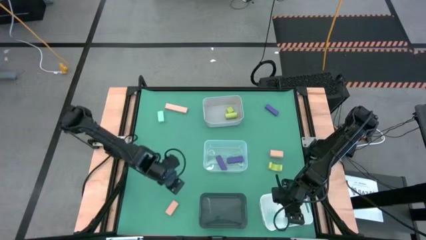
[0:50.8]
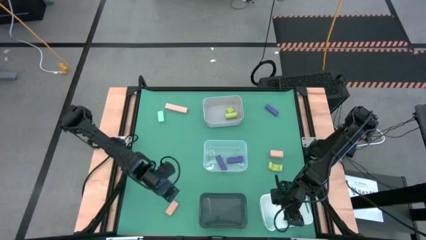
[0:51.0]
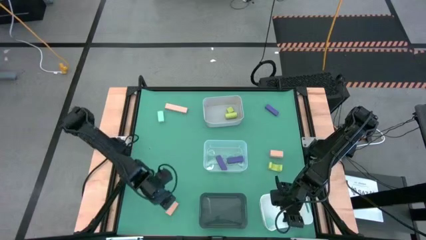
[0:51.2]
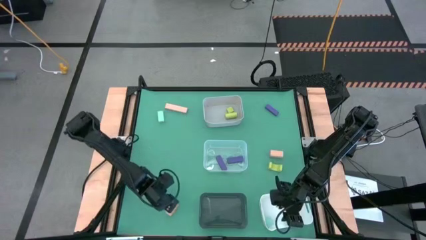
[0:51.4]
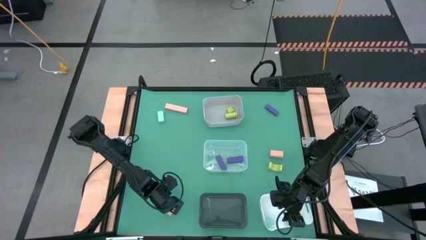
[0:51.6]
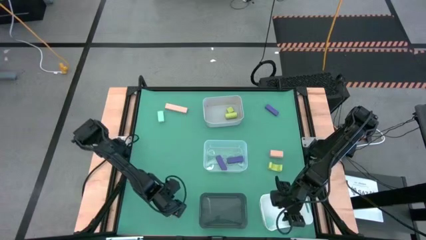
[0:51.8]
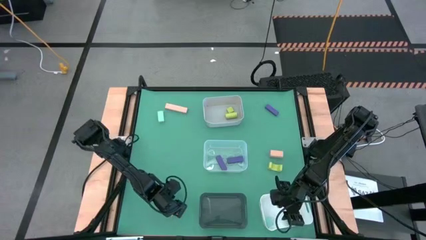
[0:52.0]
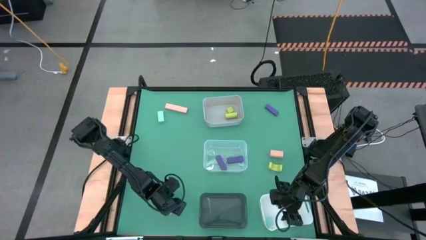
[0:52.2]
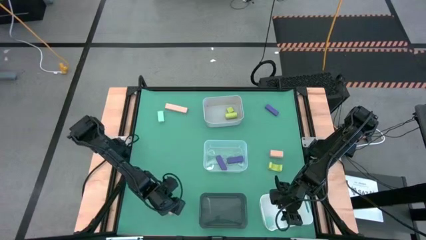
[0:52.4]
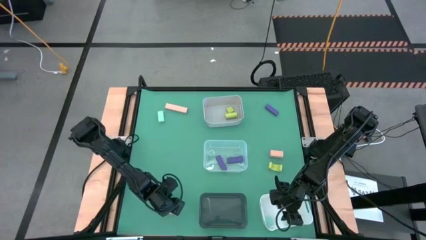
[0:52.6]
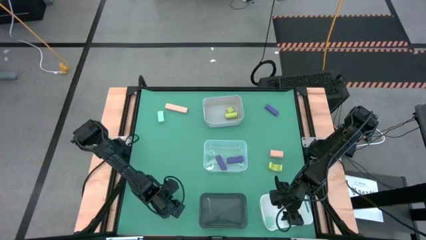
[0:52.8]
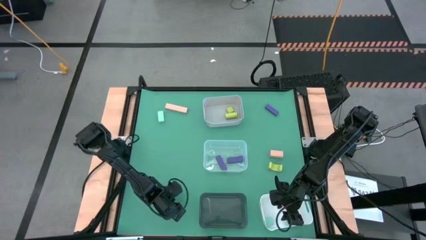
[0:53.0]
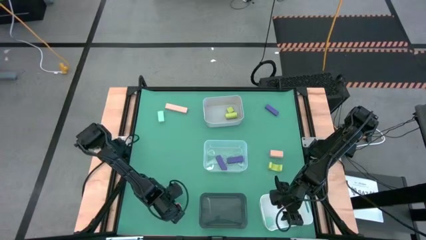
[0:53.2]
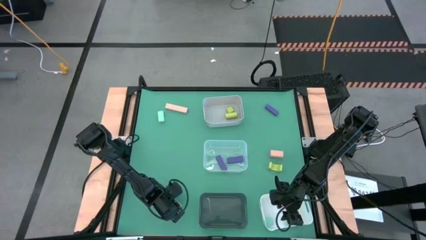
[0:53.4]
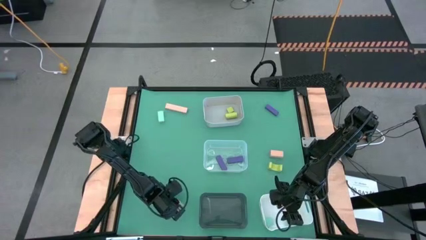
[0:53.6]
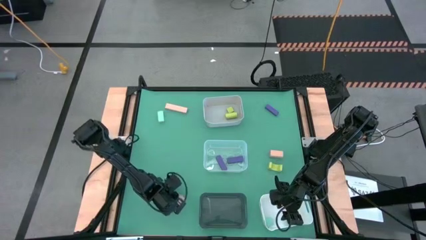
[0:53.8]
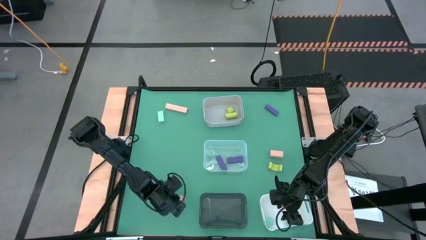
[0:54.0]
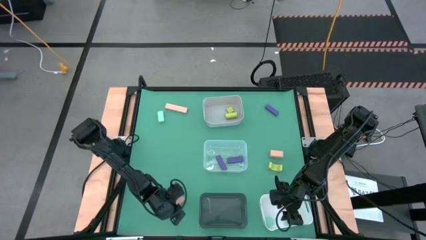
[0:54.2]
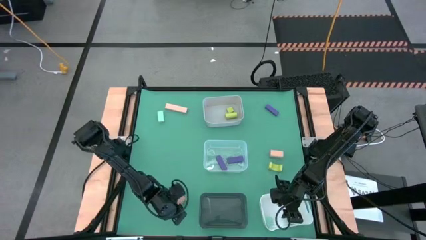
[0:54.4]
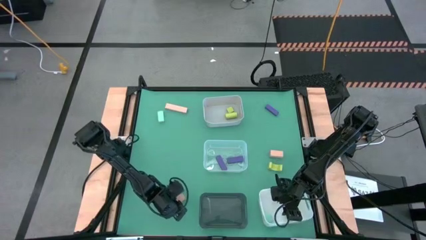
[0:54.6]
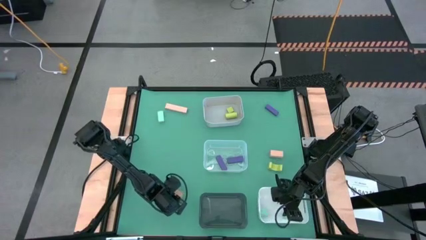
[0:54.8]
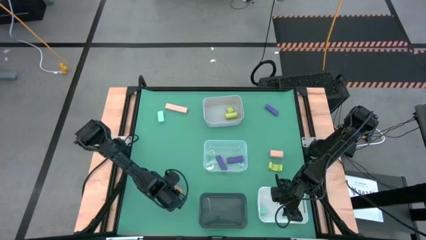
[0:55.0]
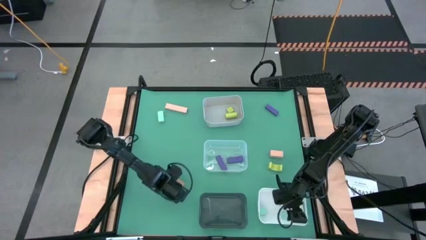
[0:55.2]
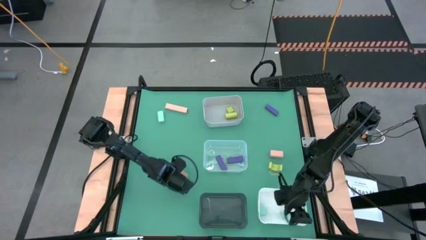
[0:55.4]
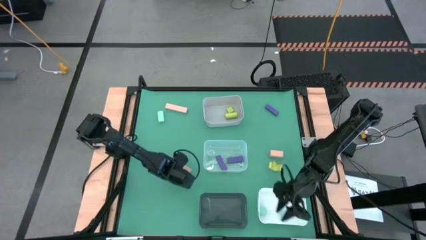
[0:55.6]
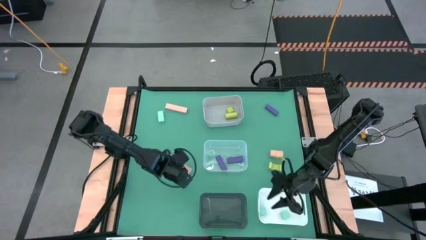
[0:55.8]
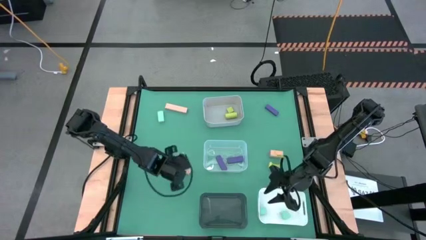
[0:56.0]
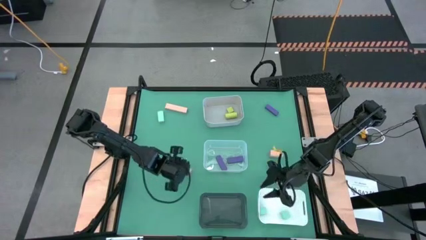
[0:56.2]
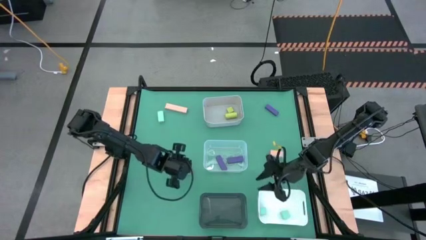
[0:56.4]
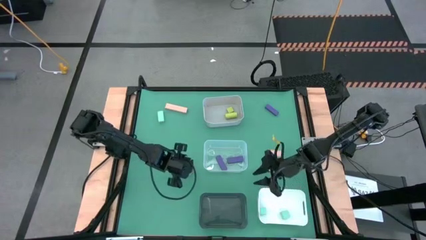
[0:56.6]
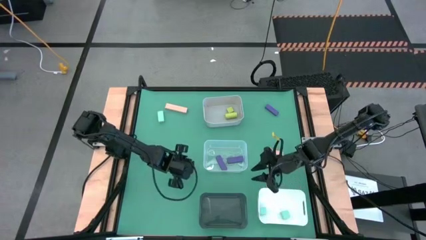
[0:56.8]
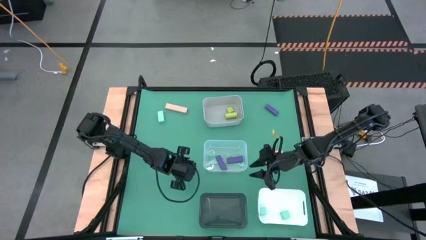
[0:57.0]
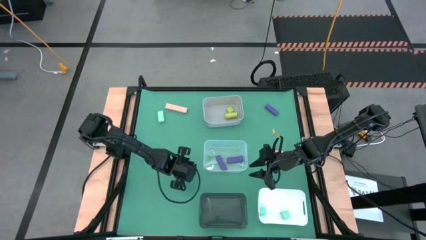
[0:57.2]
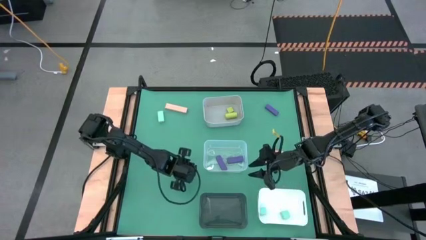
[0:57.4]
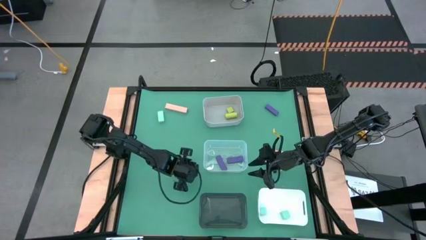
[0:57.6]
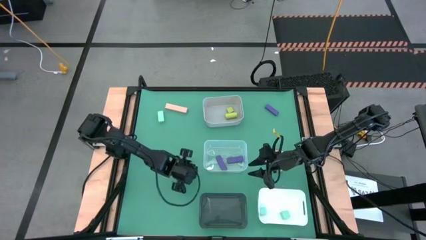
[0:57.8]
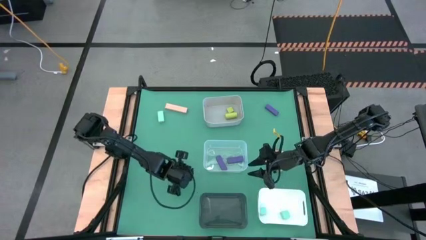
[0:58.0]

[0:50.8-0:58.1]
Task: Sort & place blocks by color
Put the bottom pink block into the black bin

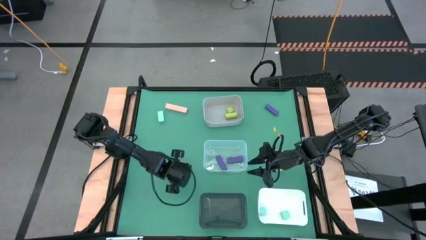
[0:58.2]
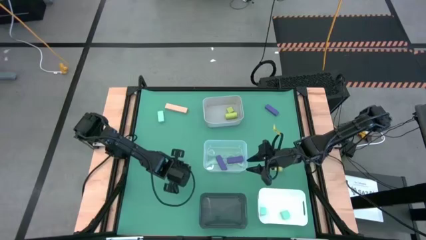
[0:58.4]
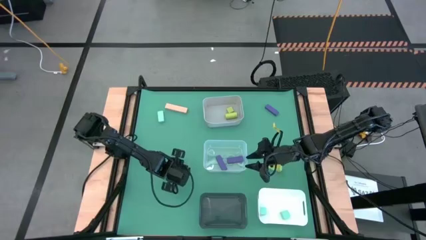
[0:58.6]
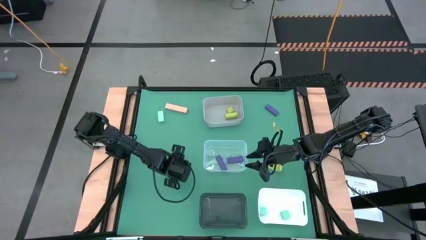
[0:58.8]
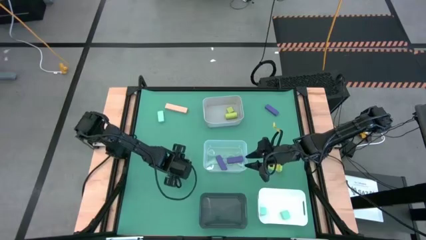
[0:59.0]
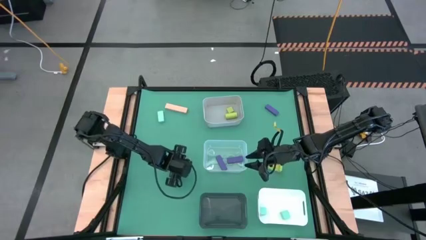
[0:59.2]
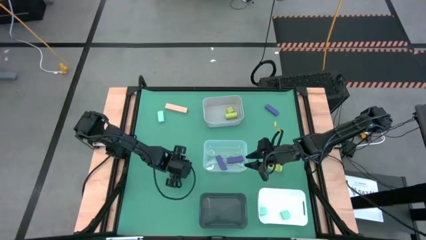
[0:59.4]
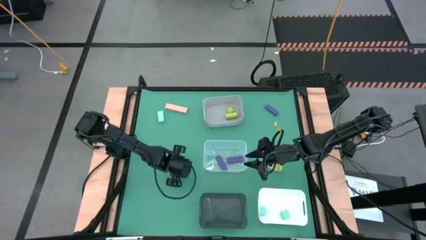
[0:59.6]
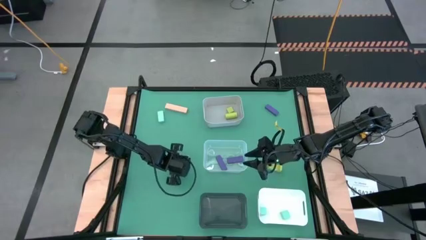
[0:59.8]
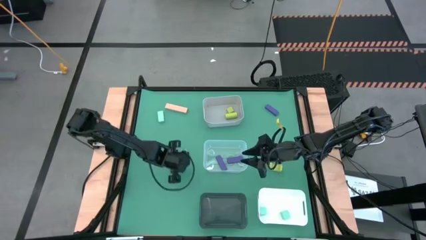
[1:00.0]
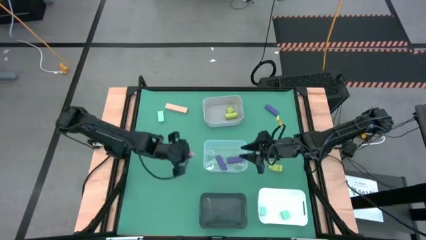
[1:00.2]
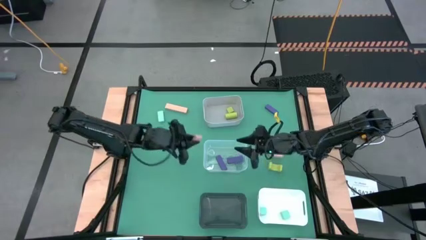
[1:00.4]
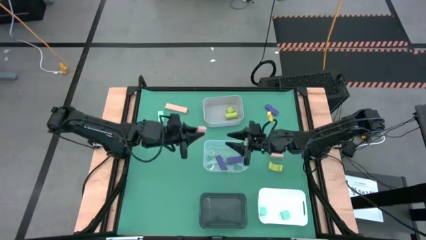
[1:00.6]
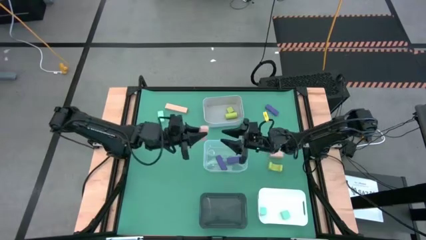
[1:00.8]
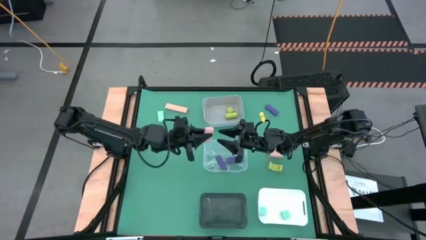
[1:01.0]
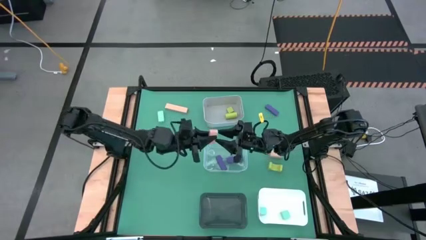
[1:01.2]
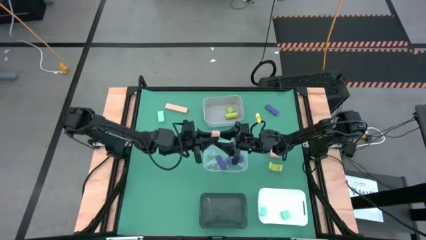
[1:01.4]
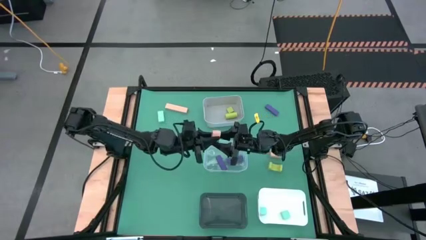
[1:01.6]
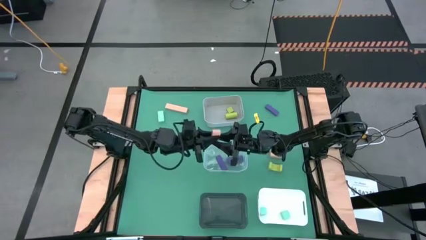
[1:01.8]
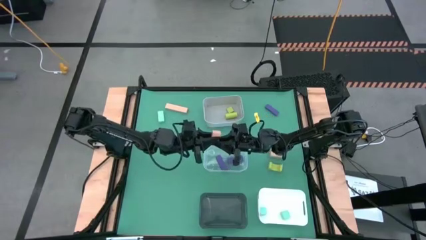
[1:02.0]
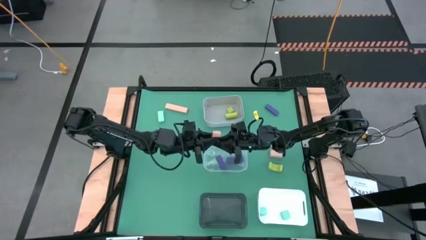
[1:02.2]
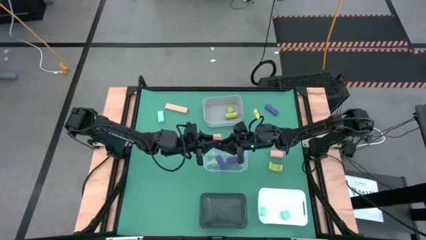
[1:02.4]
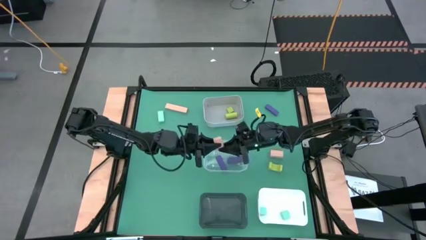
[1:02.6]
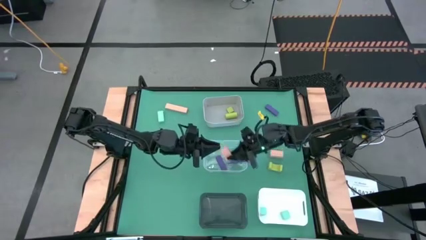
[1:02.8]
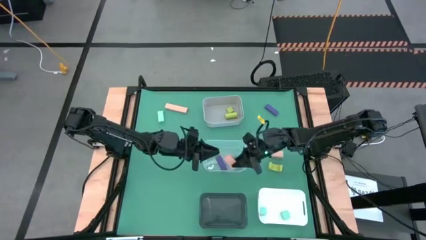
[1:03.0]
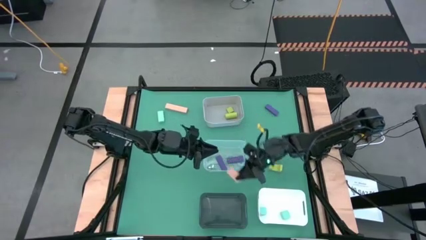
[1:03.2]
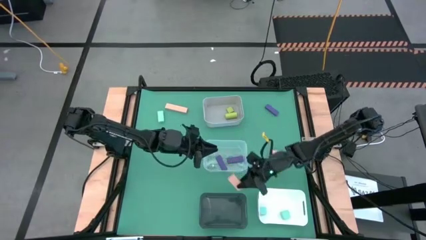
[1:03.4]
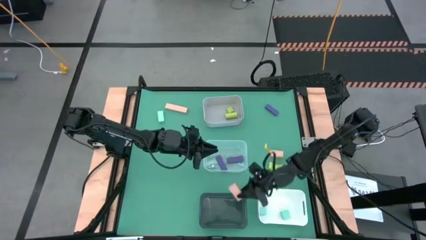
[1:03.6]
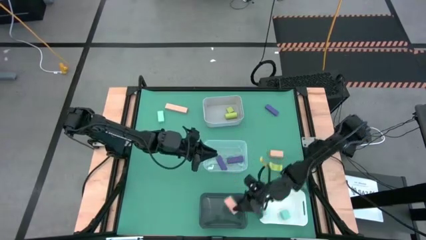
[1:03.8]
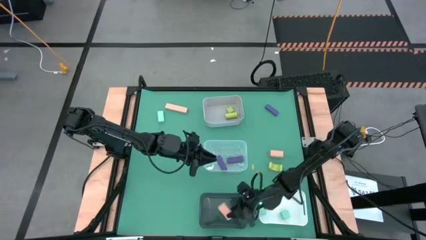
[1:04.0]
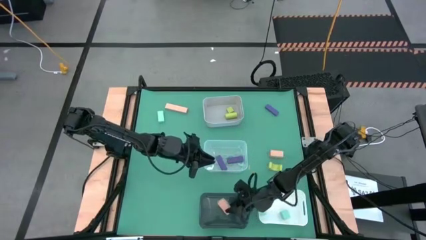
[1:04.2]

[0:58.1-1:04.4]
Put the bottom pink block into the black bin

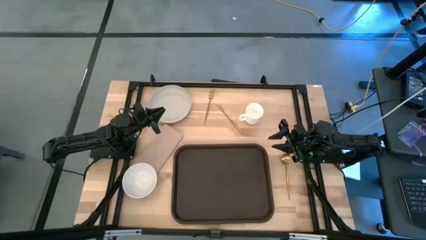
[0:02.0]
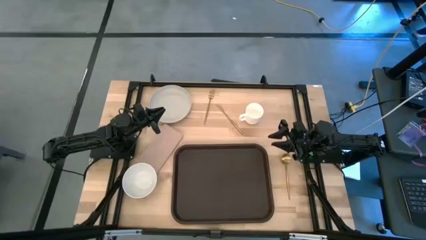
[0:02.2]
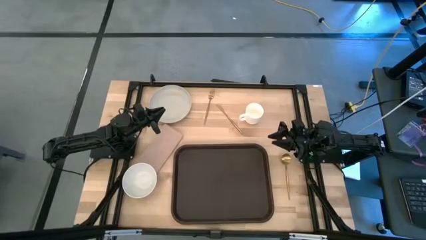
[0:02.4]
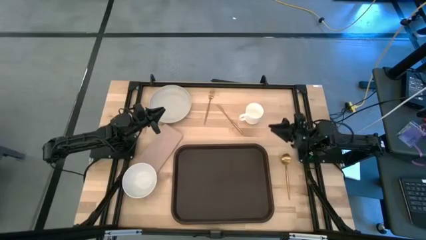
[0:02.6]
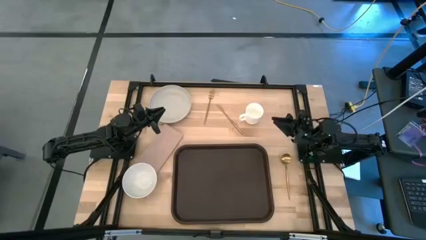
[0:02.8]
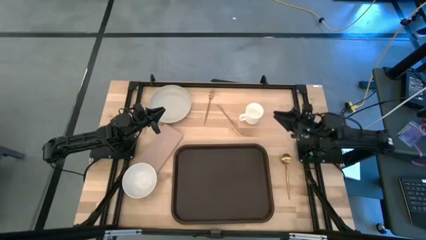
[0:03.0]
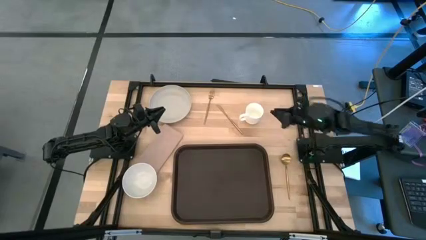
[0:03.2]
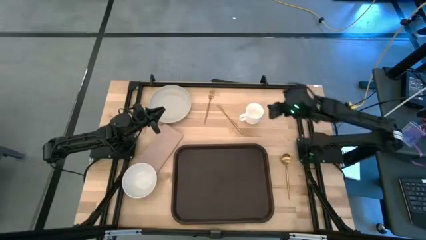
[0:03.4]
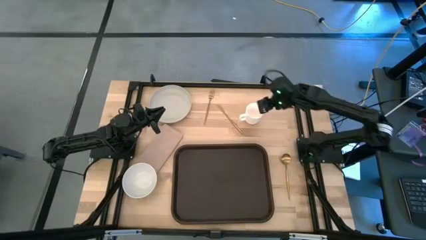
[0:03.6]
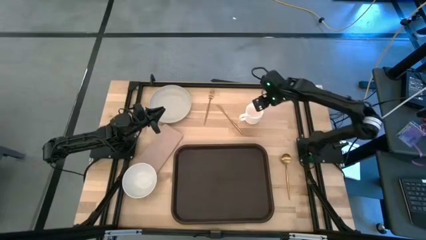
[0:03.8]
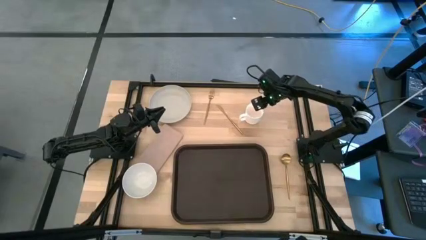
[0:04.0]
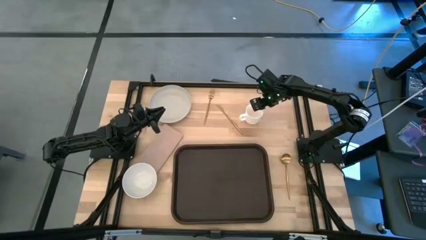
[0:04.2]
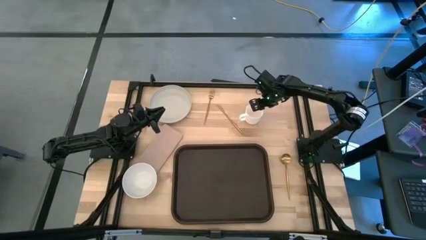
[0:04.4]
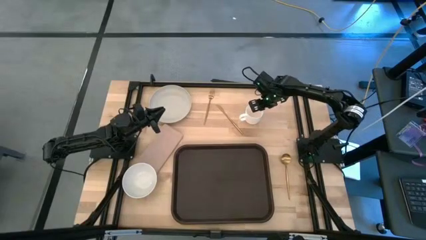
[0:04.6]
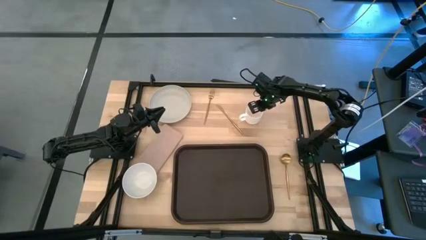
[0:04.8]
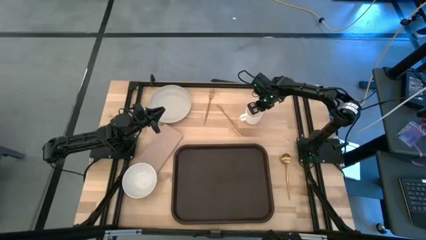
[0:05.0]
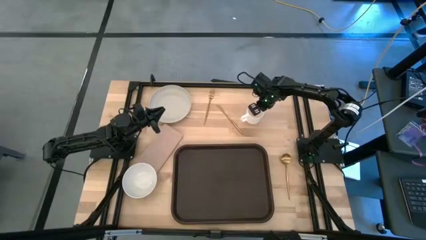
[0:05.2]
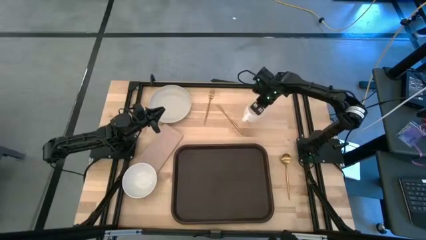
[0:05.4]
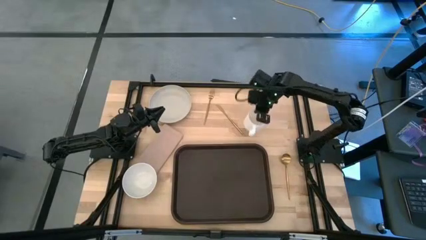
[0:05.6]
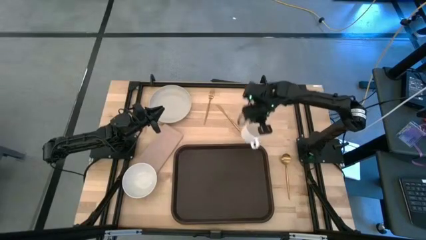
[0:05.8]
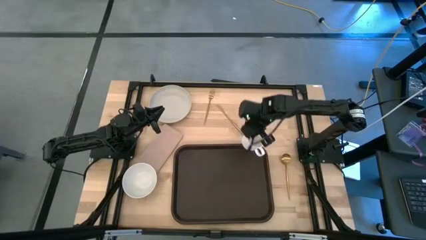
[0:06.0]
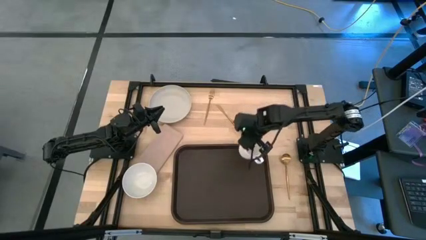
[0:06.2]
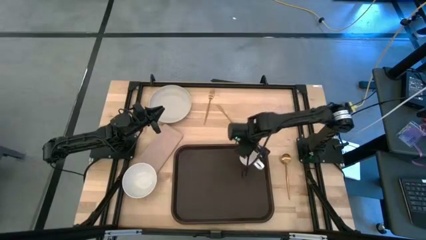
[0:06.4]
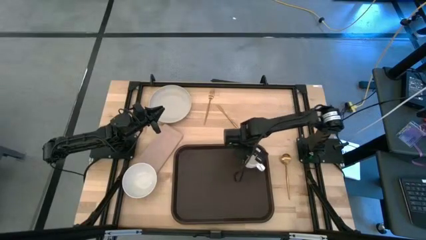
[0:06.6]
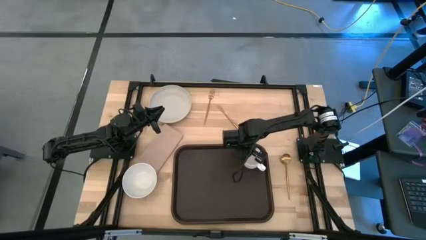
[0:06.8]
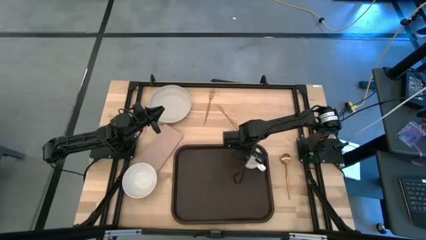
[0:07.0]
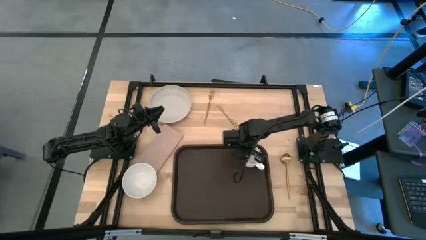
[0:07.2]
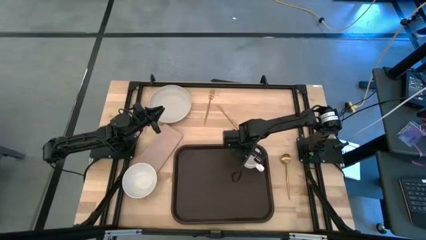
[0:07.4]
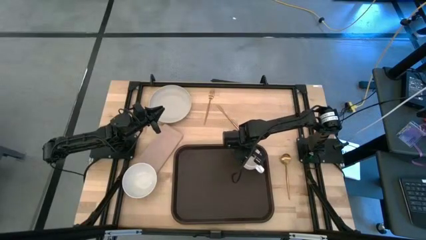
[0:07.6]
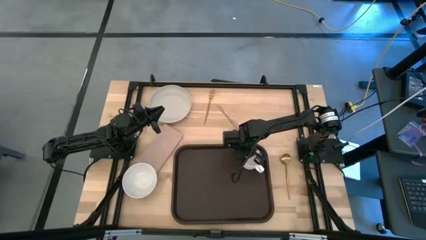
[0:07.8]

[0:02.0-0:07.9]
Task: Set up tray
Put the white mug on the black serving tray
